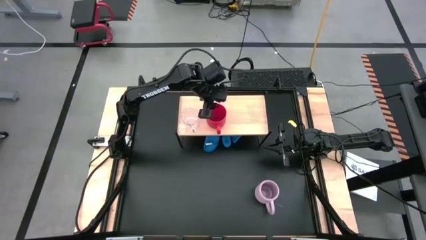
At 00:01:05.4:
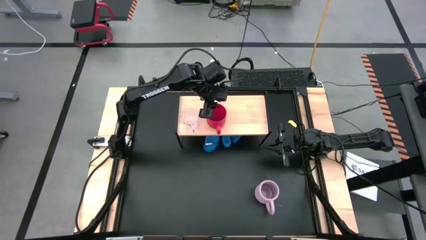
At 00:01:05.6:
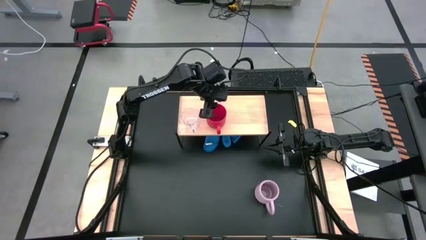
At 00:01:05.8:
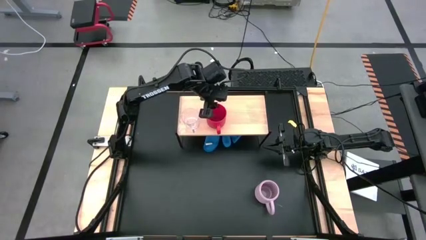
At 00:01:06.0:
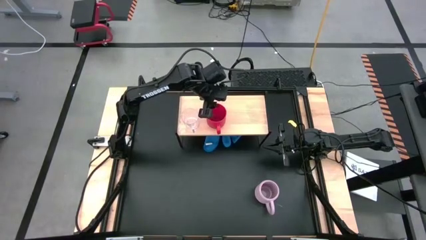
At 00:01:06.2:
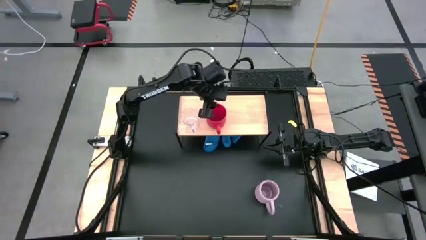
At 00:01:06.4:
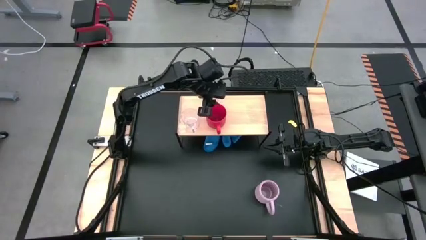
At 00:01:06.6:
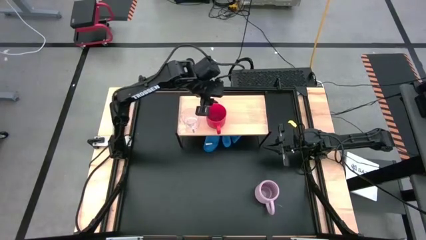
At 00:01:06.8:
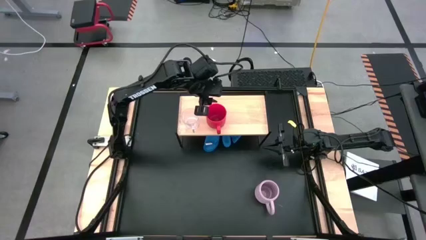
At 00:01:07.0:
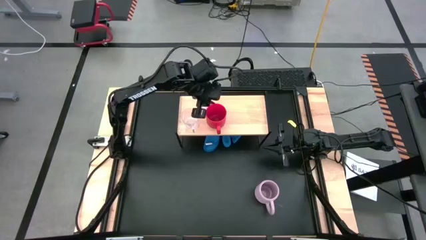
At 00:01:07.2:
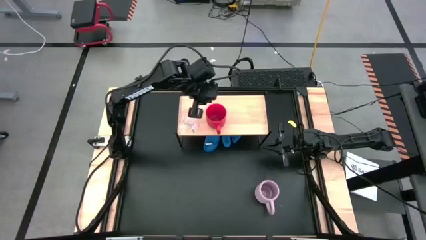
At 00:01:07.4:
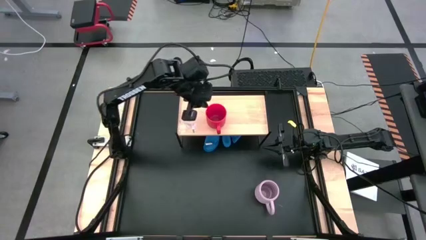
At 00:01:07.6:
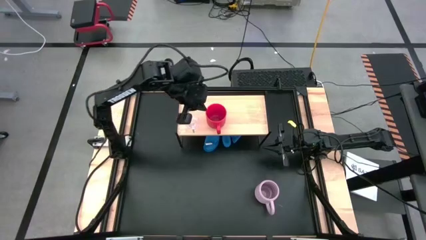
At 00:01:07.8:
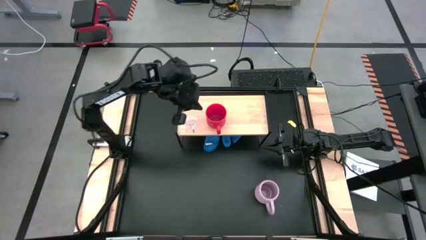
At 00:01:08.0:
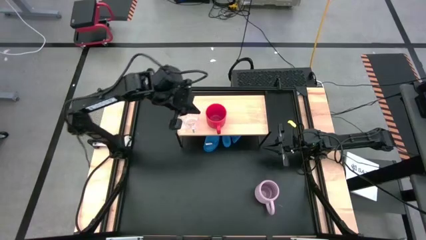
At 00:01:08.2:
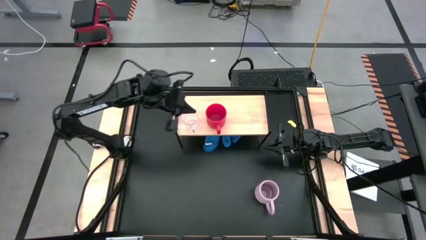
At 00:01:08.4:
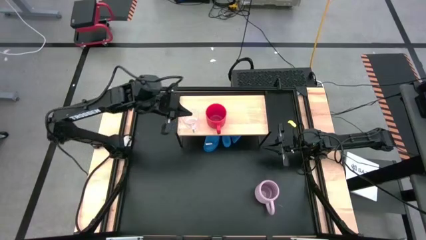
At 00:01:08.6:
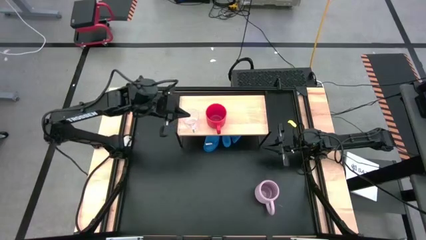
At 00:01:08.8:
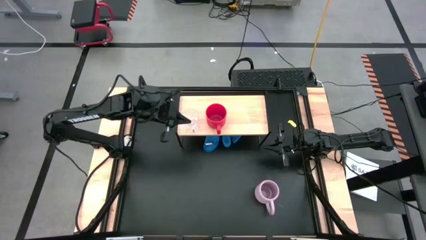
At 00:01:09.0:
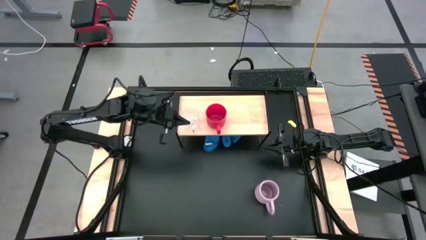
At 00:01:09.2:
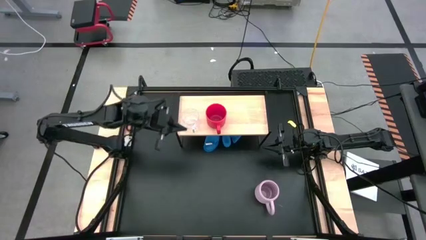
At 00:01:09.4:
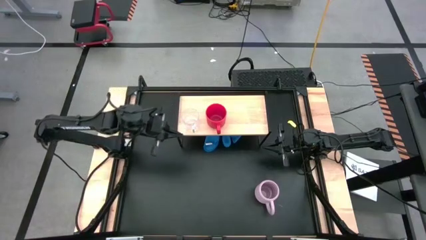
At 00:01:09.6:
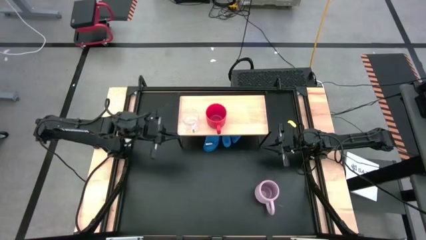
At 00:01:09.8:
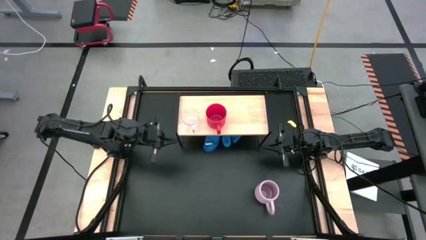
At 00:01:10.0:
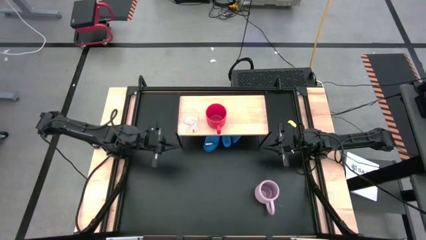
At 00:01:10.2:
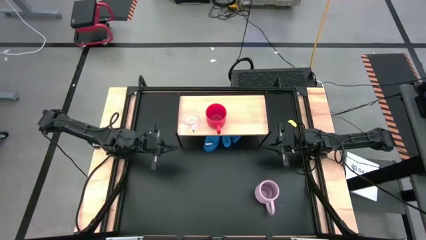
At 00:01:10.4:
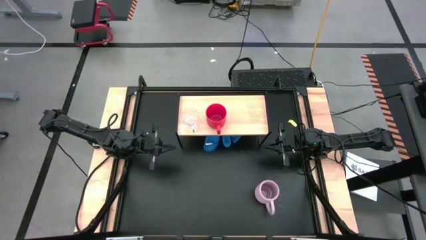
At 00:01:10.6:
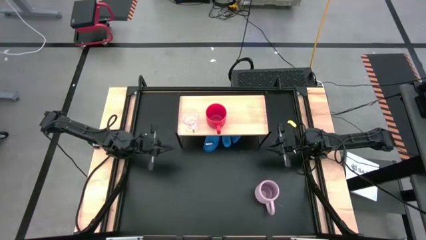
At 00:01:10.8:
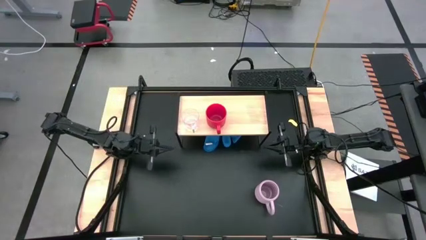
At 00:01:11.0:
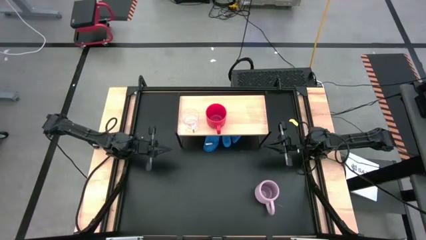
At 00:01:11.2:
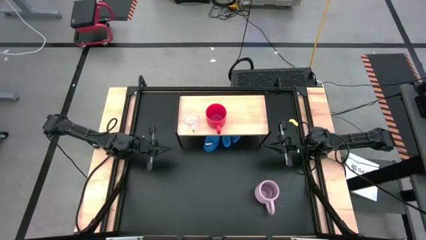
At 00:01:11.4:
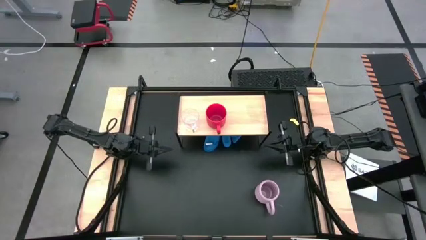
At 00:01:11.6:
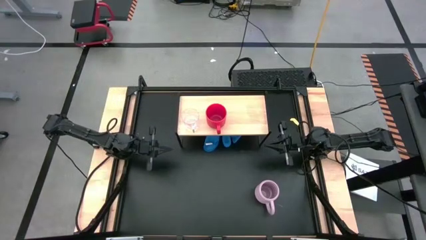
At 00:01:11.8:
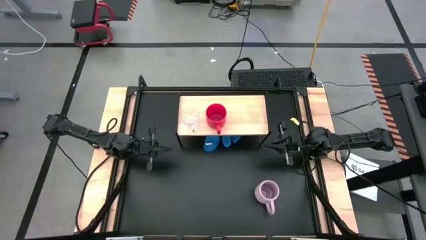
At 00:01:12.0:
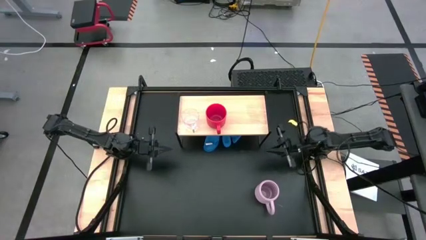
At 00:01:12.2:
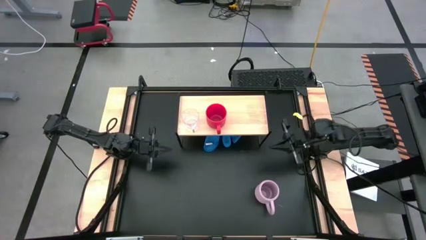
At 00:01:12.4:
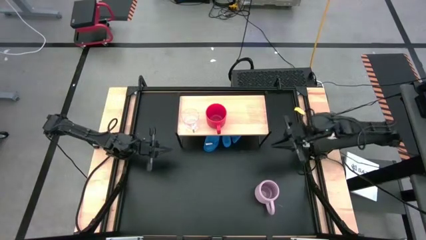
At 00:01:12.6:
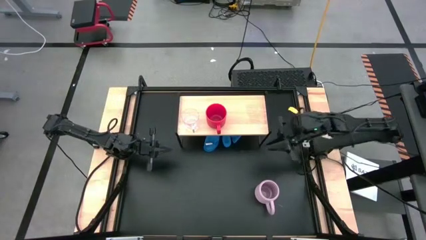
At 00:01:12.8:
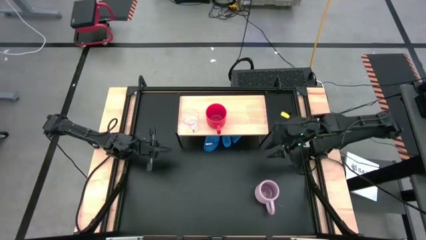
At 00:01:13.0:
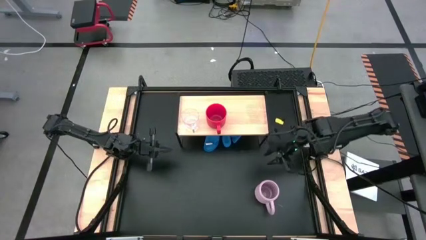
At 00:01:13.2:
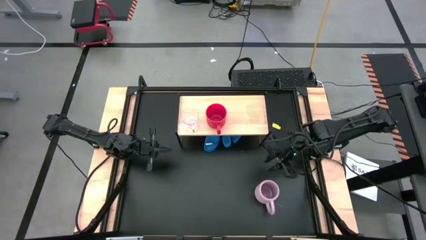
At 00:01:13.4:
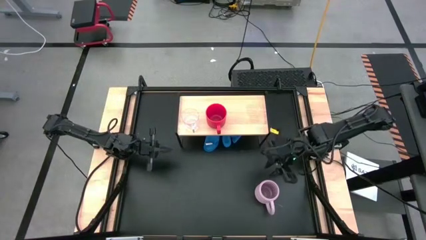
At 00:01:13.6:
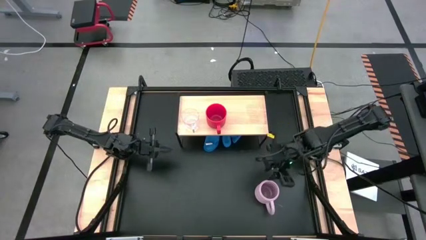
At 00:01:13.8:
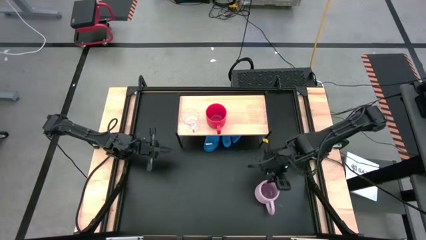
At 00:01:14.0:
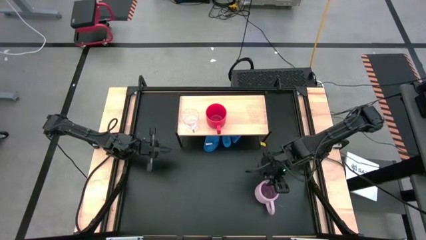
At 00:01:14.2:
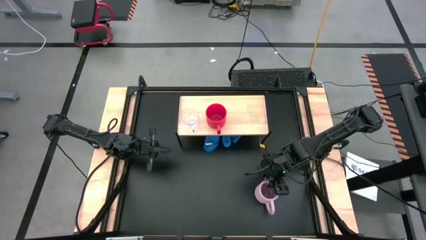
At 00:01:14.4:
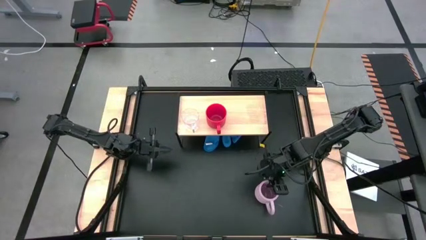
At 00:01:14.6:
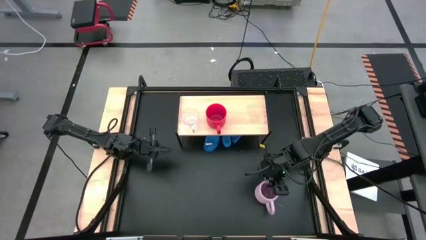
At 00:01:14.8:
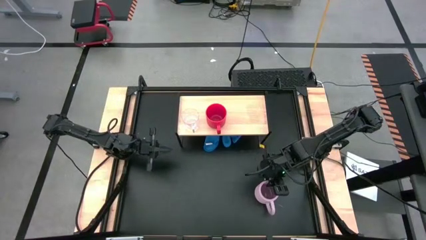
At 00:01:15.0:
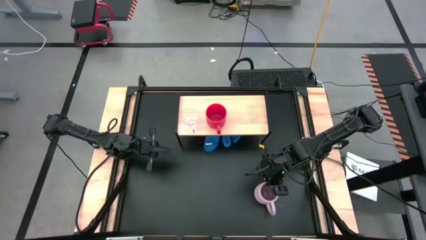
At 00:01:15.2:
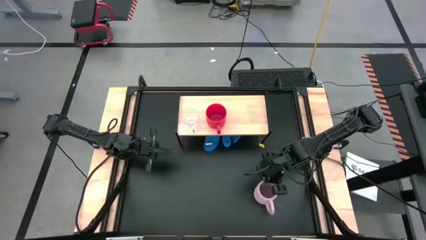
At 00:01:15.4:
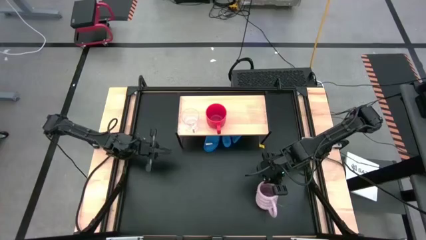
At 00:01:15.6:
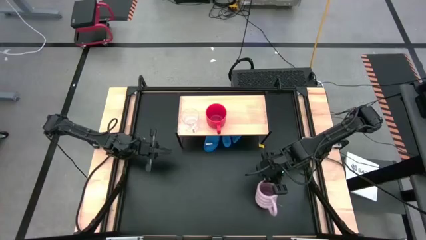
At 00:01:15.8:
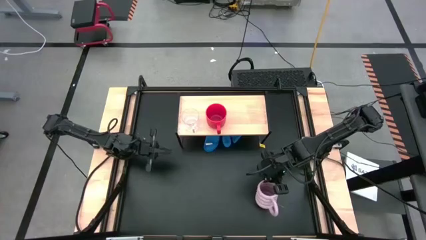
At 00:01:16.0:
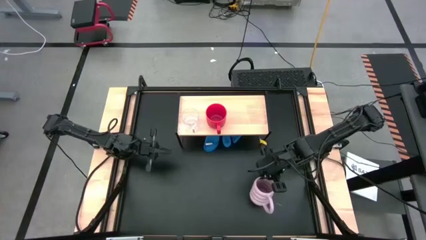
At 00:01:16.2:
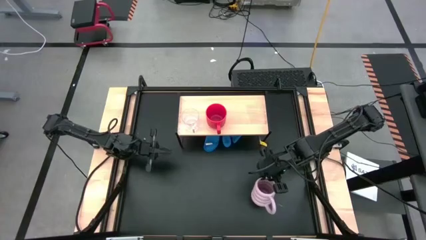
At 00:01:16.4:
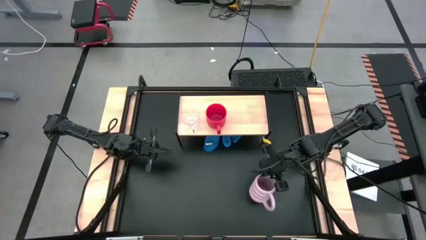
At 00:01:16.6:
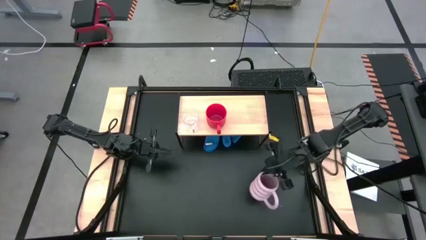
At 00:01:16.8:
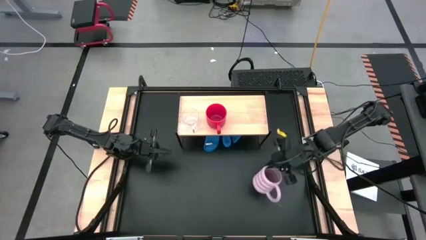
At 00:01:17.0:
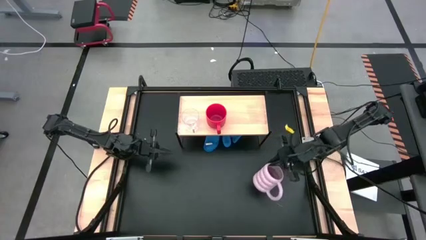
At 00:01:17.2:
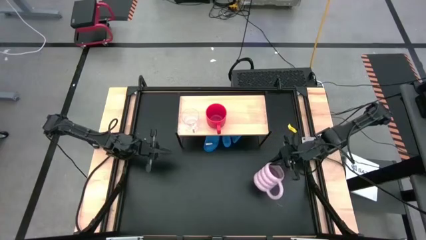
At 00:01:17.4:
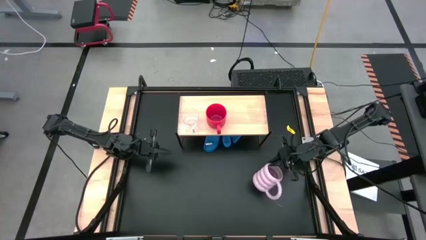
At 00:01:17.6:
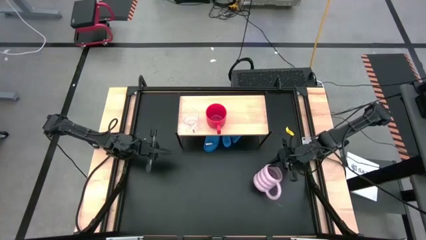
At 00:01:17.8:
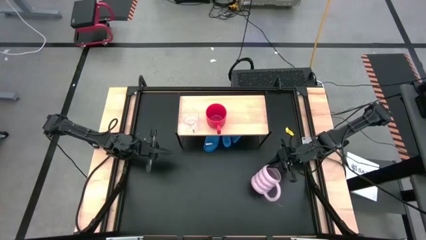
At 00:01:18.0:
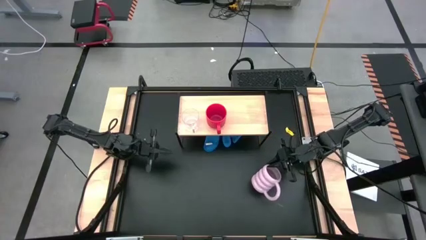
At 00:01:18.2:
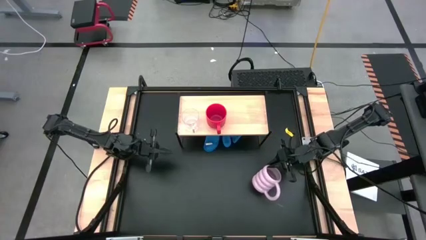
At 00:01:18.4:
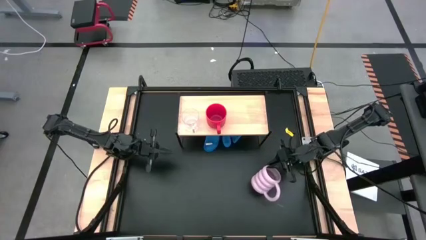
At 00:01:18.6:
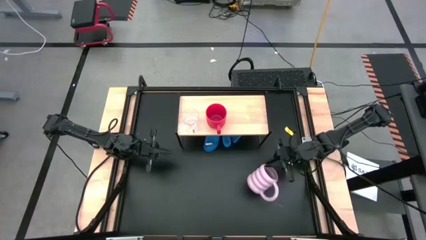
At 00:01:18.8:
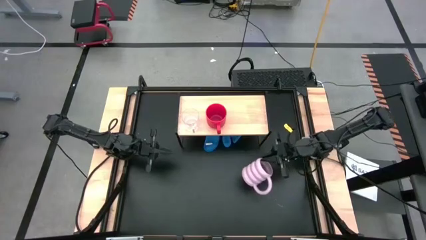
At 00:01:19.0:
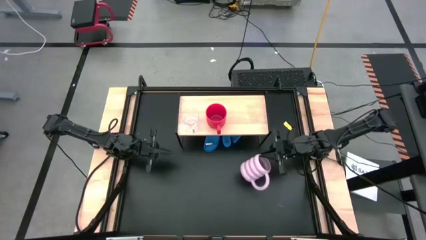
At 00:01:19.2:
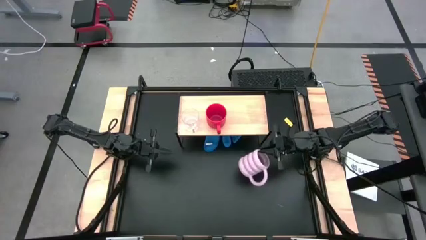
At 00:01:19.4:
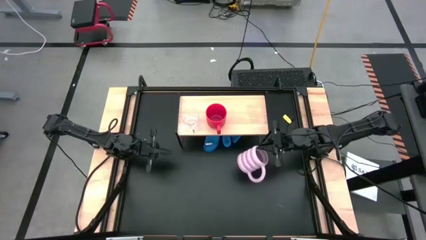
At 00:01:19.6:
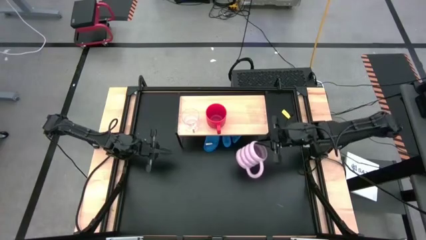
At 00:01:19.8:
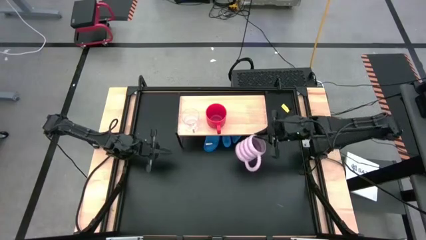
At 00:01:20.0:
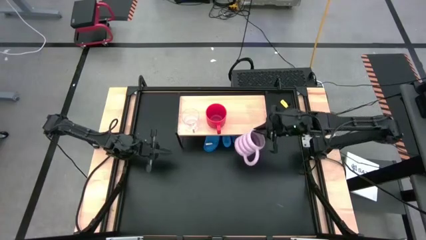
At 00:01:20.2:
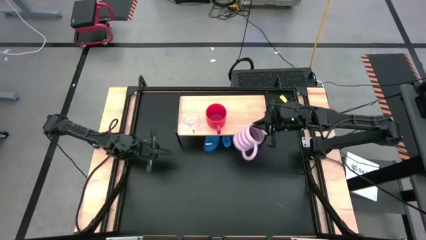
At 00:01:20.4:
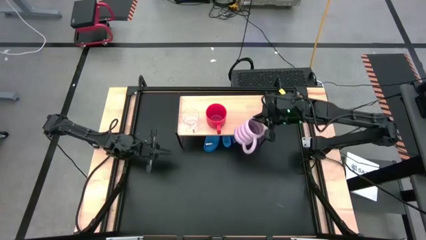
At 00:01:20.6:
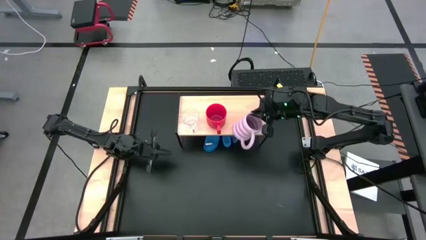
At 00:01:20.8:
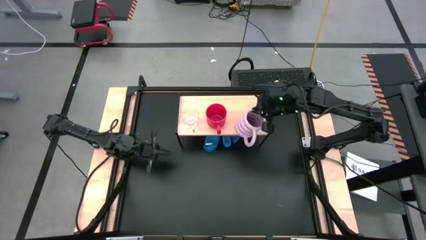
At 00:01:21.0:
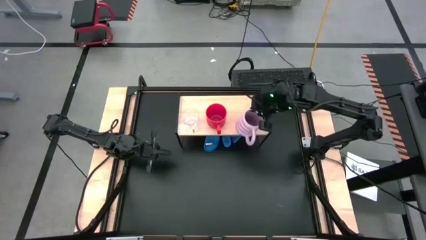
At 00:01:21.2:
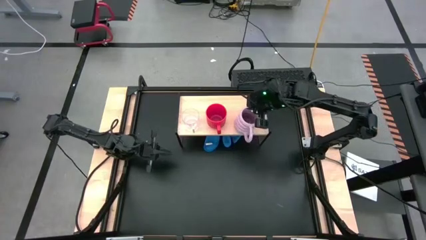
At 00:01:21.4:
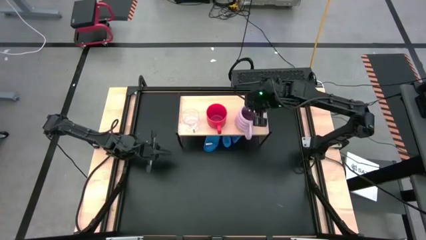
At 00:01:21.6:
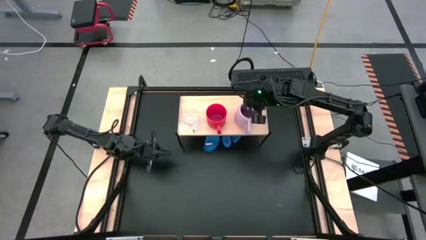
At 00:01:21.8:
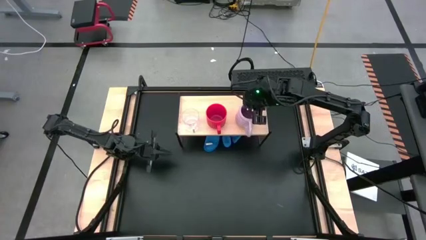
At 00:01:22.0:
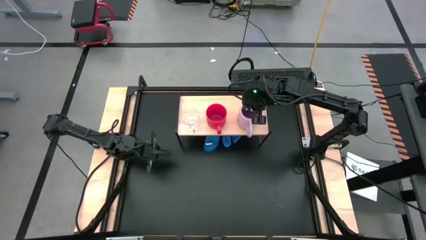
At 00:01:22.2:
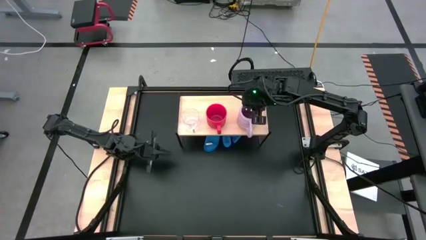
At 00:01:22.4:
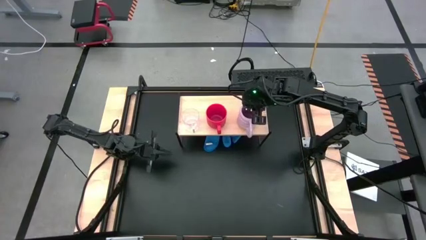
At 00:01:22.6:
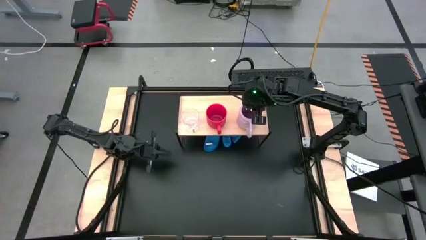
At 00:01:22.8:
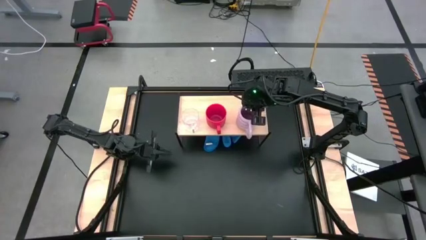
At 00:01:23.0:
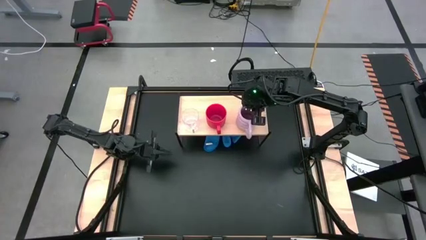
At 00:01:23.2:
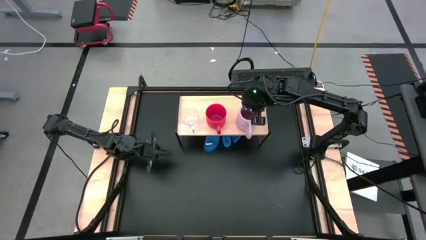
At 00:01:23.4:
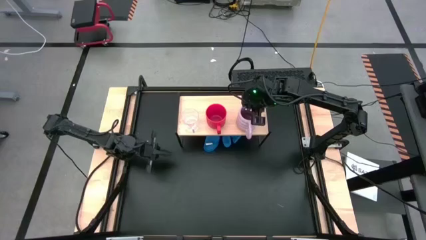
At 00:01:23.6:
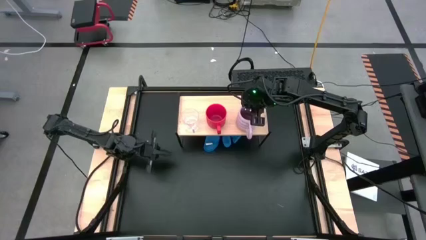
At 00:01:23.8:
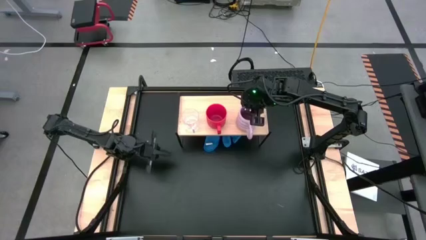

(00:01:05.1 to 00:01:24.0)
Task: Stack small to large cups/mugs on shelf
Put the violet mug on the shelf
